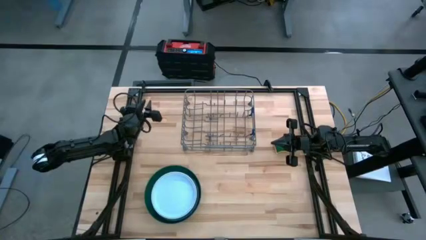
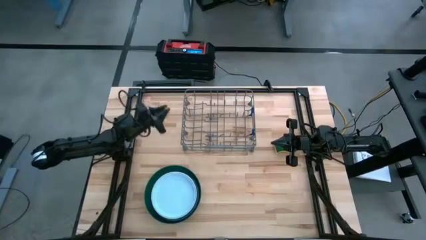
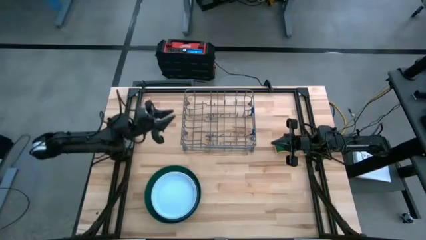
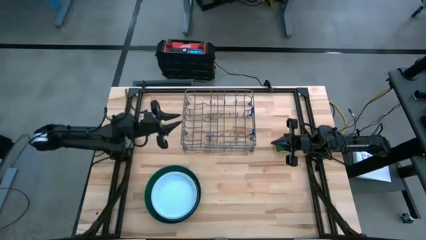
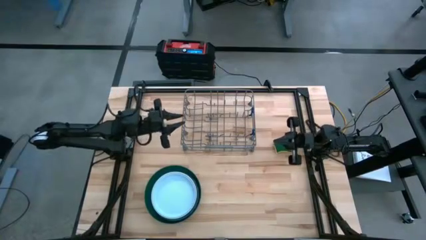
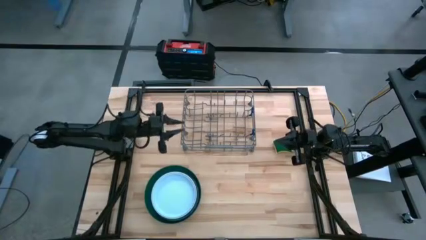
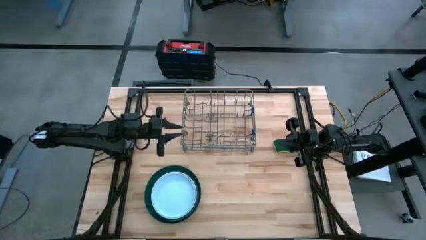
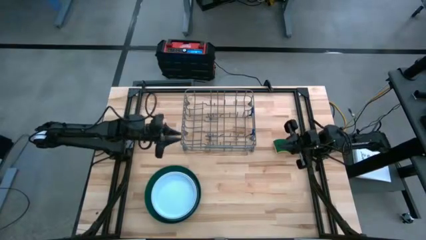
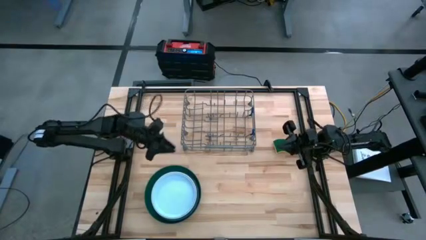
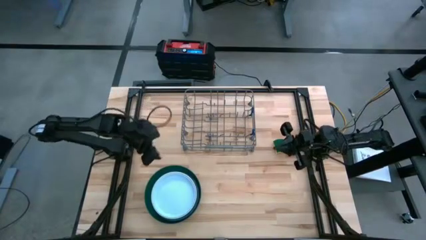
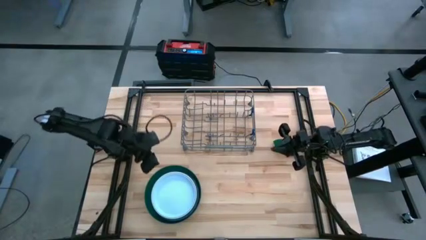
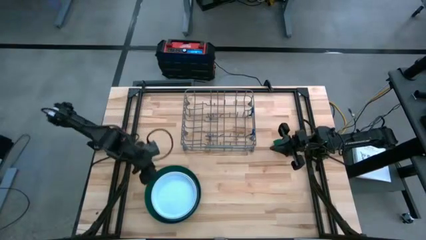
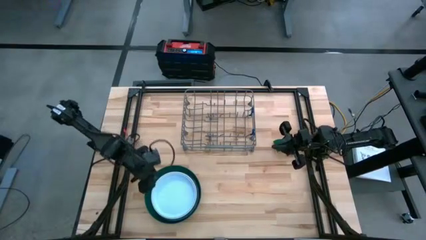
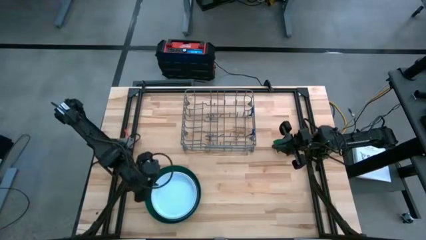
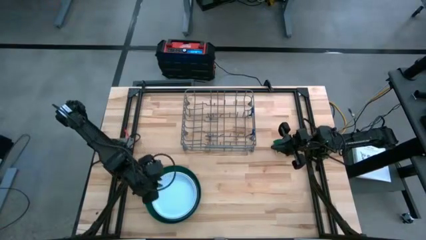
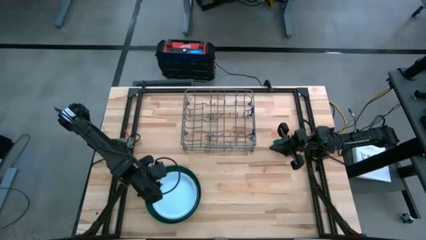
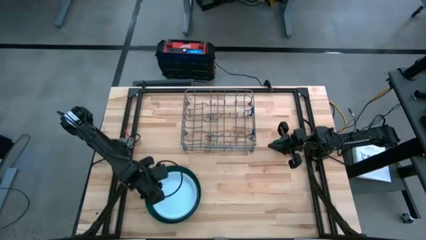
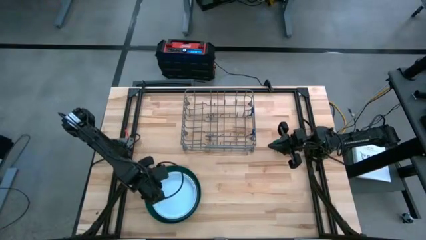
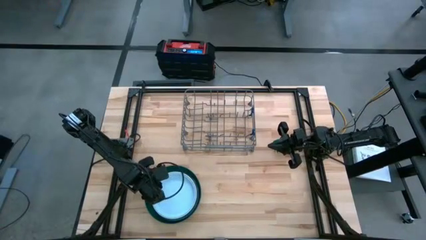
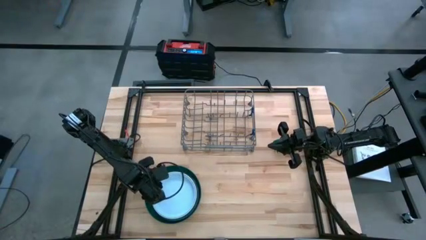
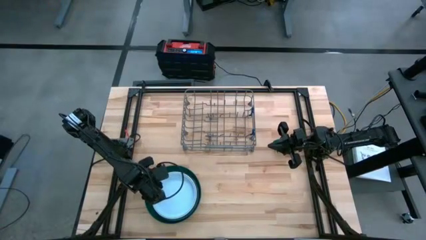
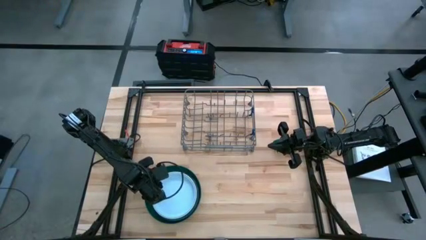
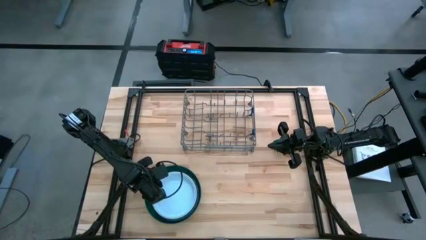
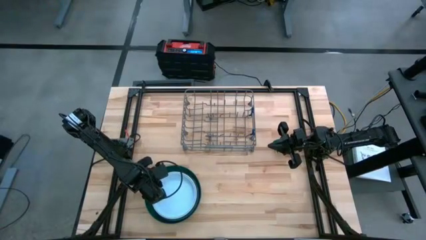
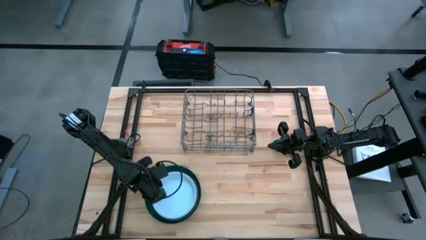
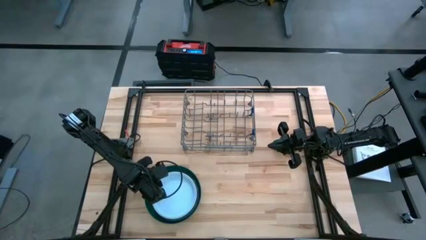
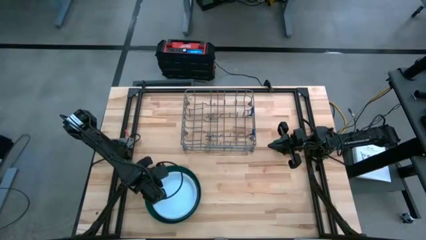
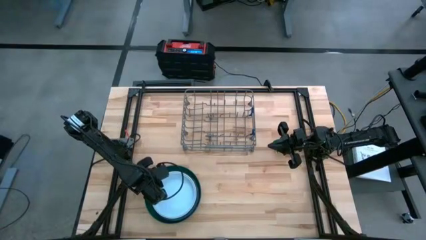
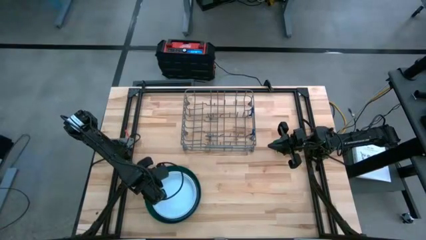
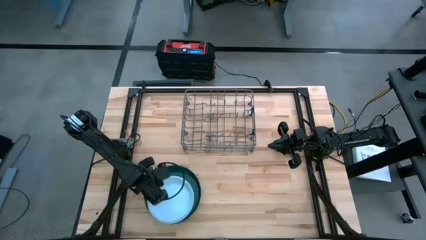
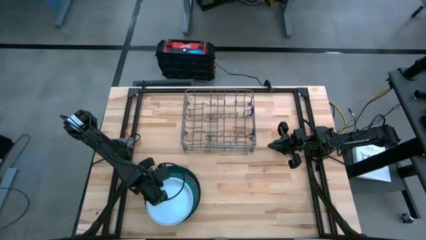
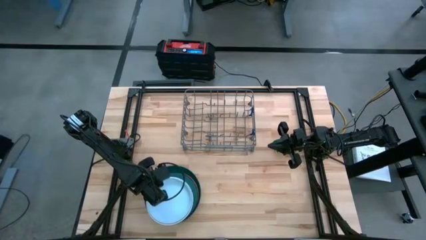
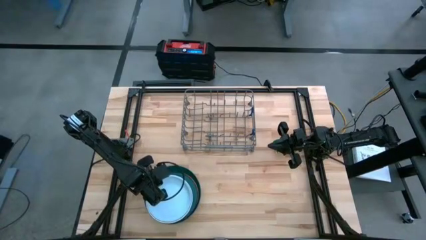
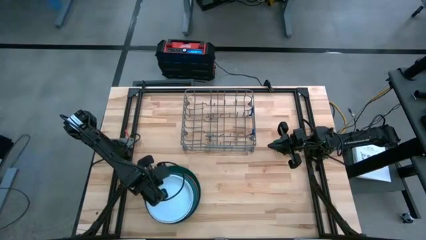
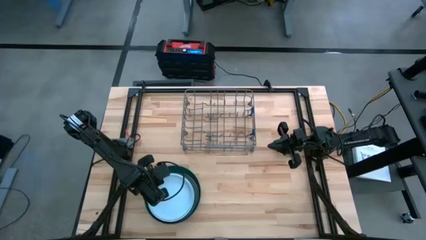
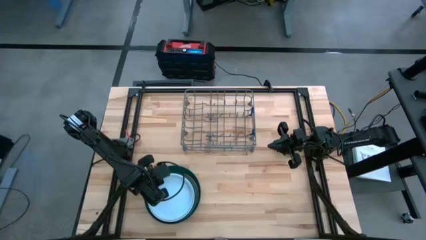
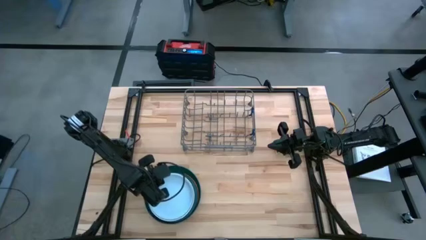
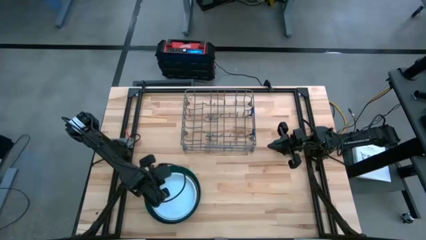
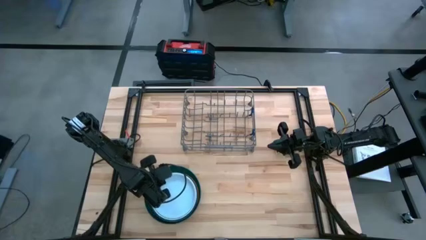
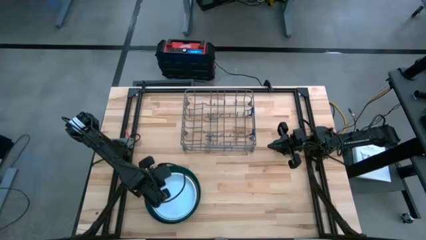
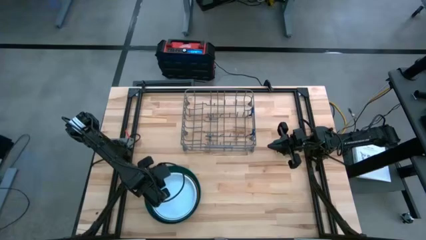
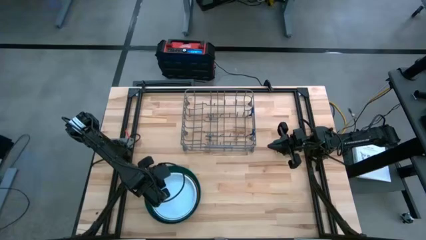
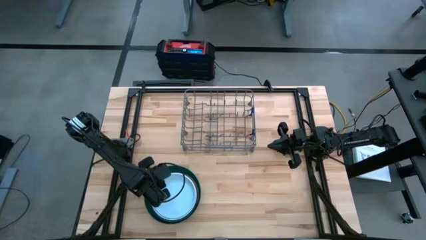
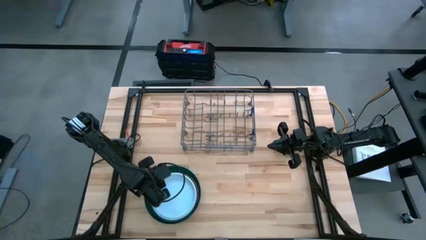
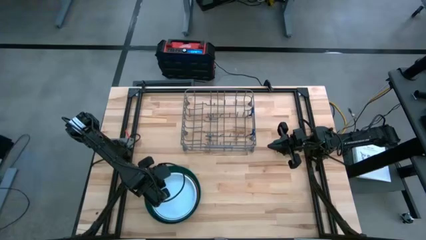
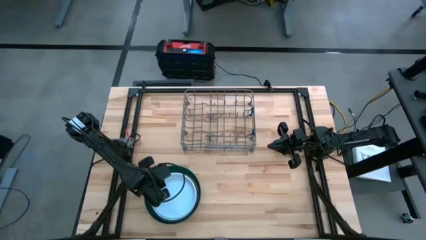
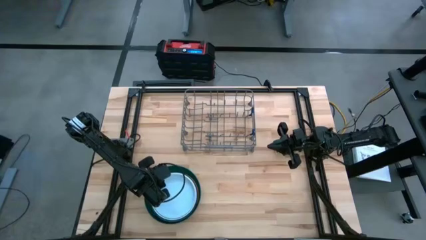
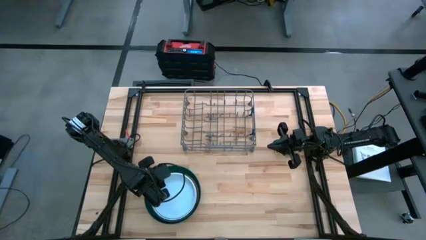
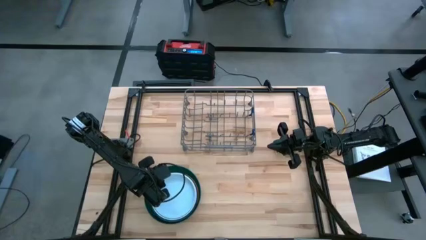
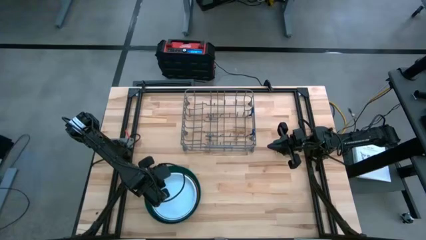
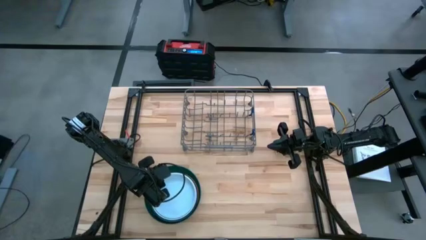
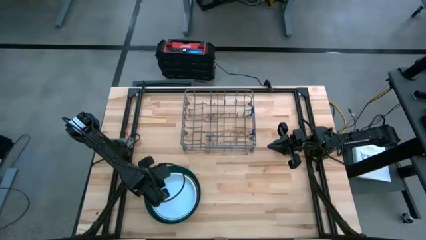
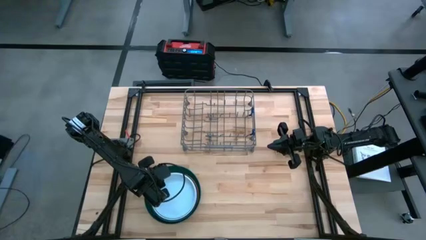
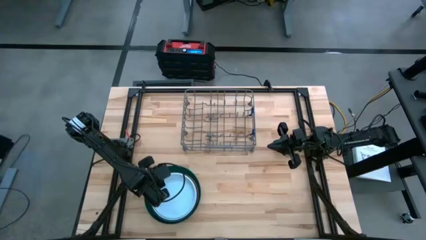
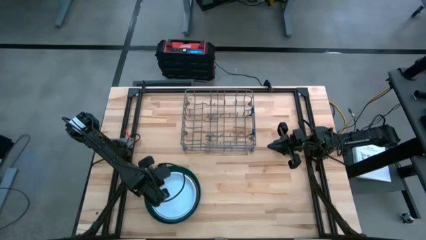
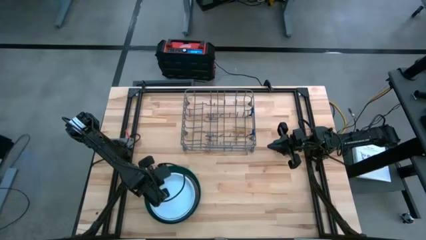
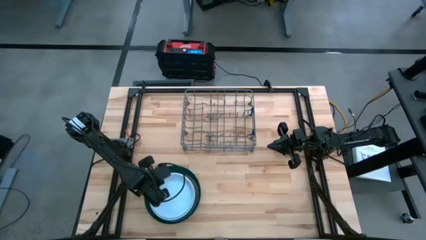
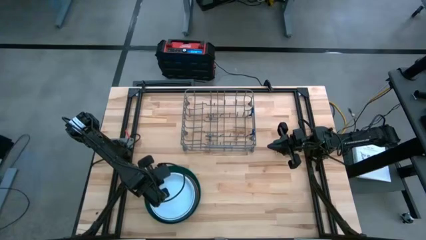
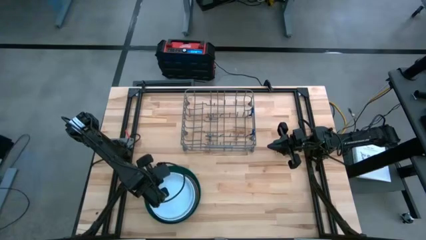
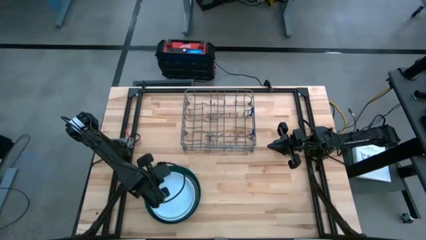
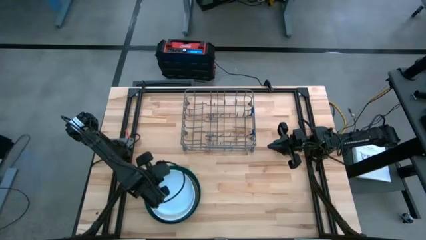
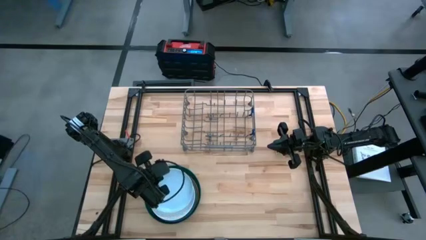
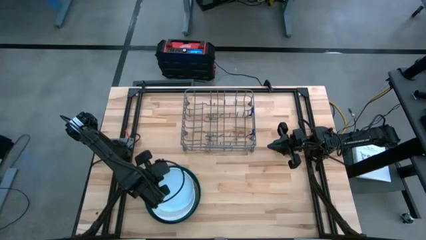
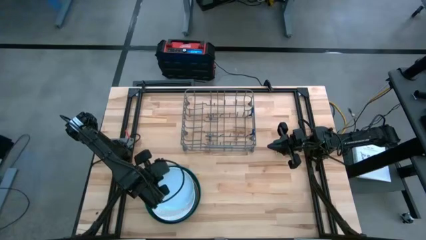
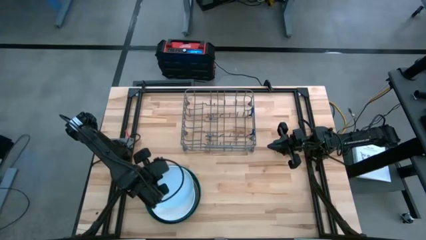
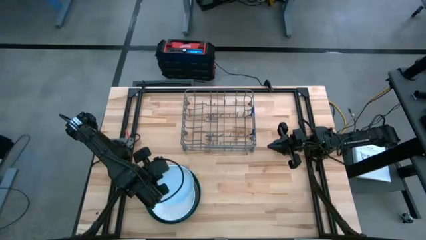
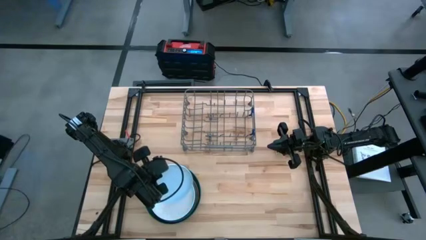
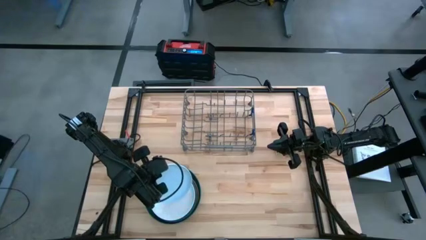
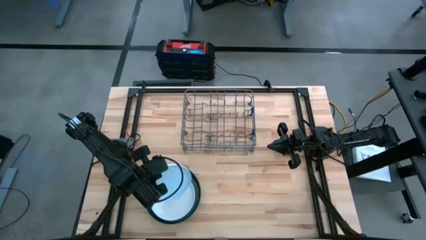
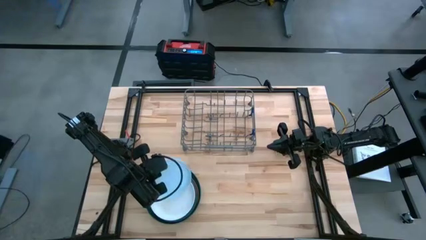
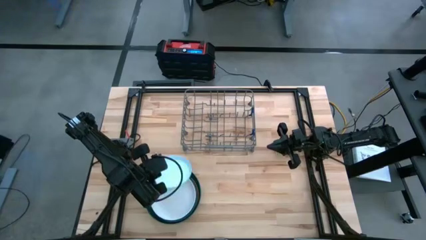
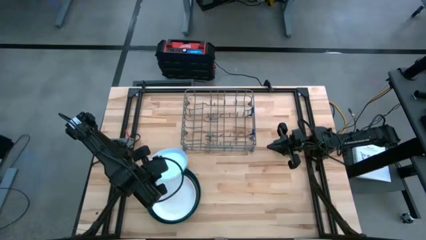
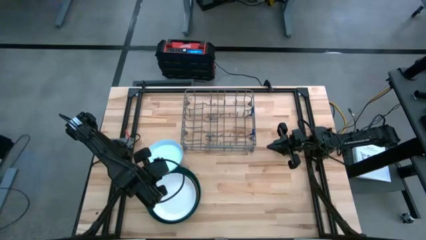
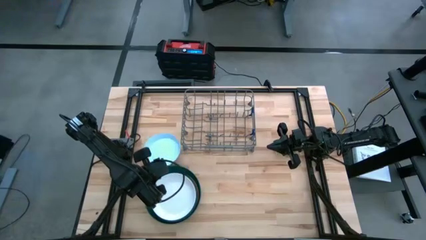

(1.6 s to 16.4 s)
Task: Sort dishes
Put the light blue plate in the dishwasher rack
